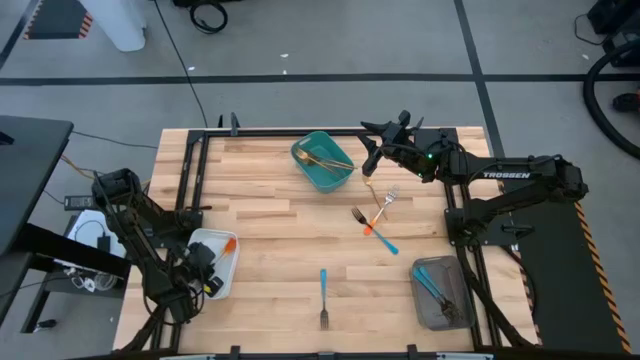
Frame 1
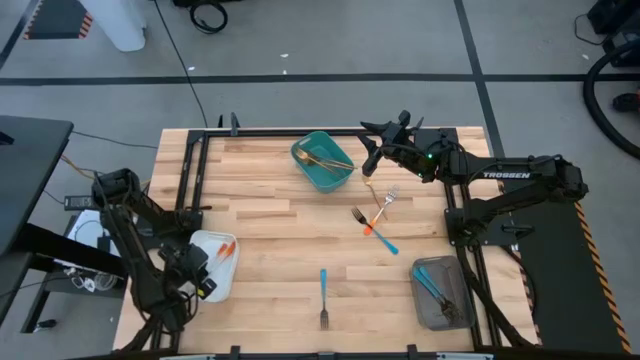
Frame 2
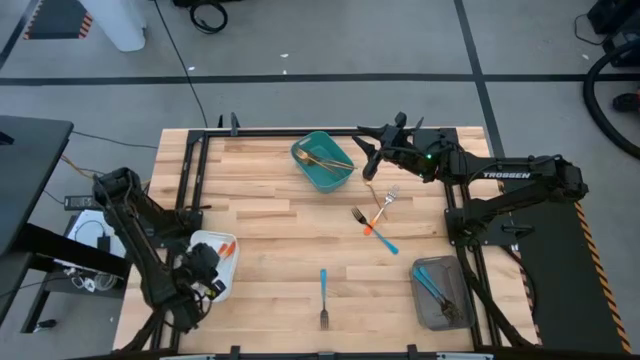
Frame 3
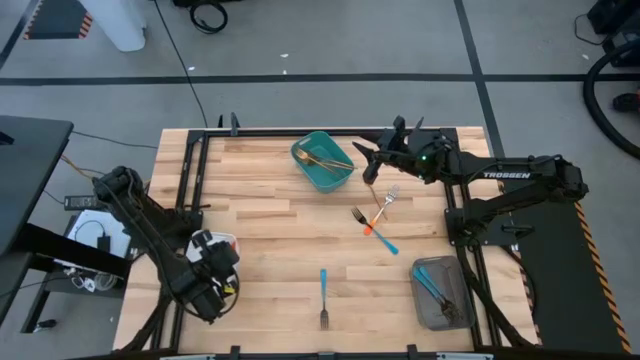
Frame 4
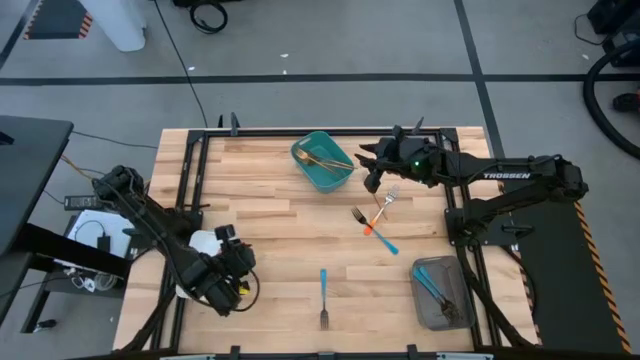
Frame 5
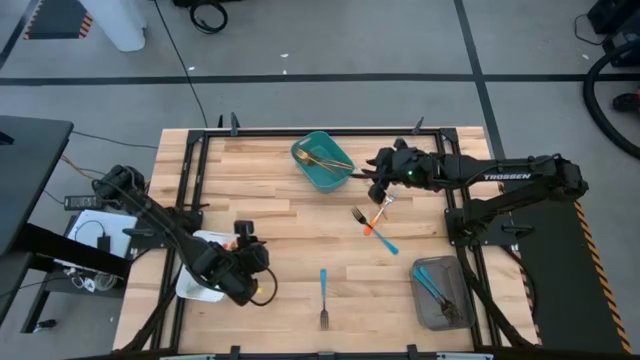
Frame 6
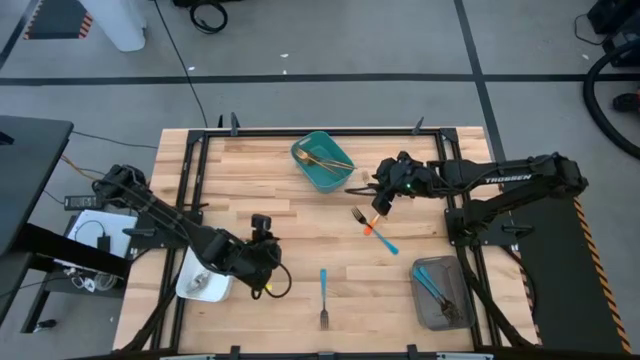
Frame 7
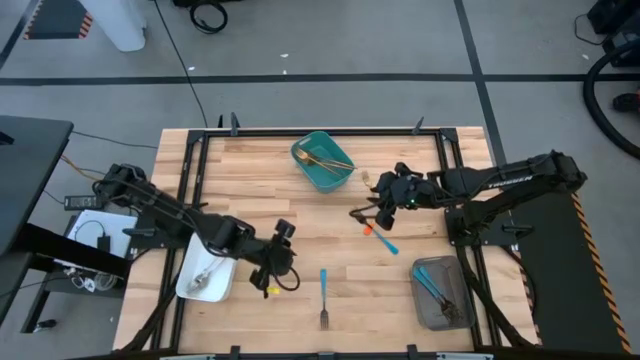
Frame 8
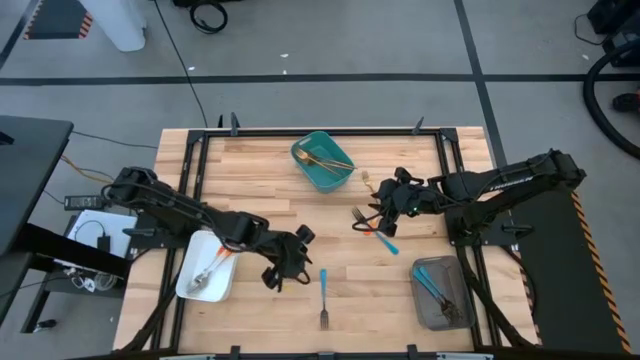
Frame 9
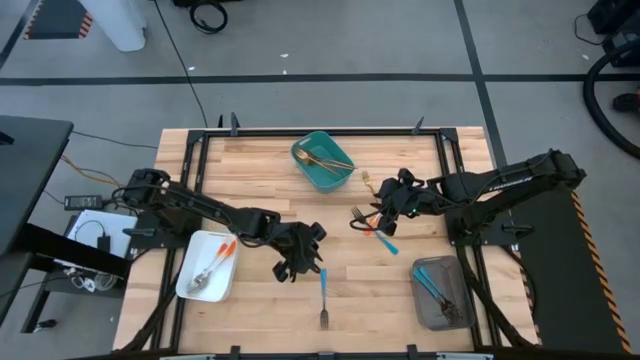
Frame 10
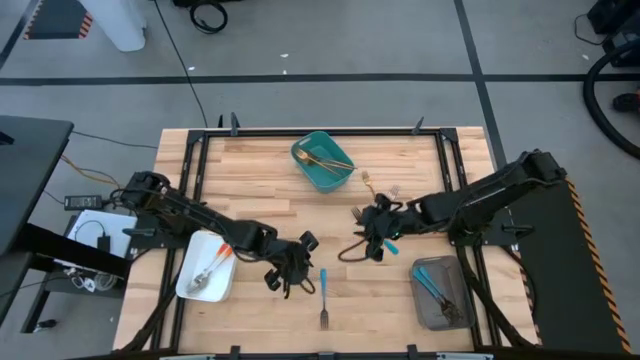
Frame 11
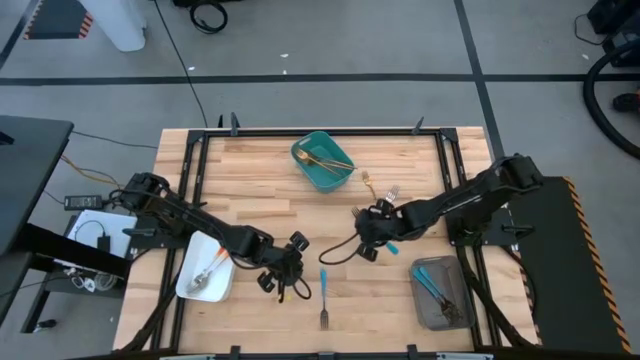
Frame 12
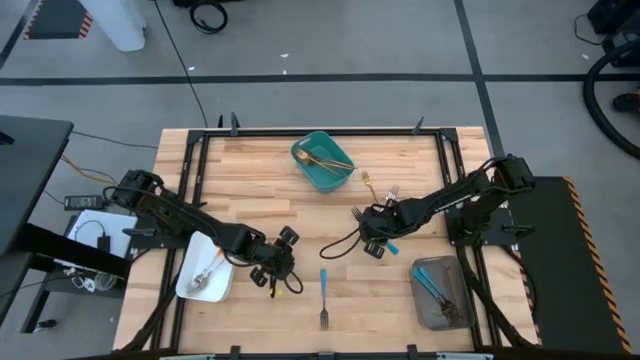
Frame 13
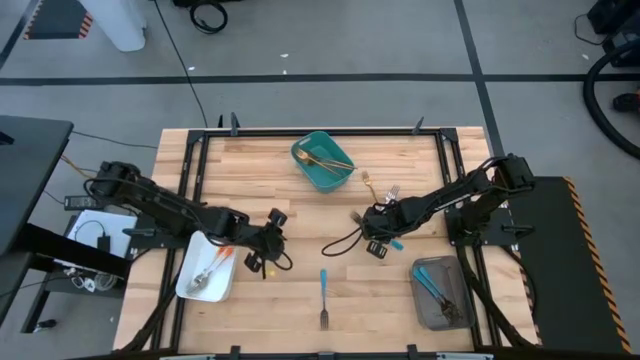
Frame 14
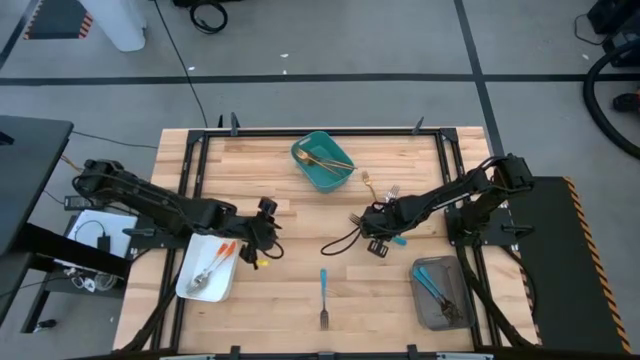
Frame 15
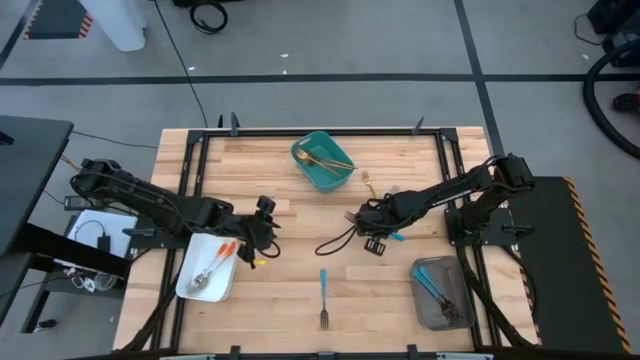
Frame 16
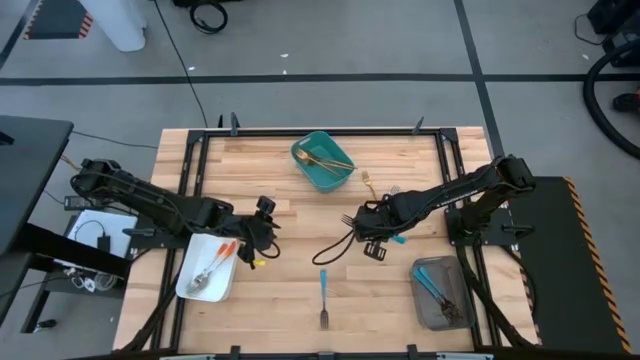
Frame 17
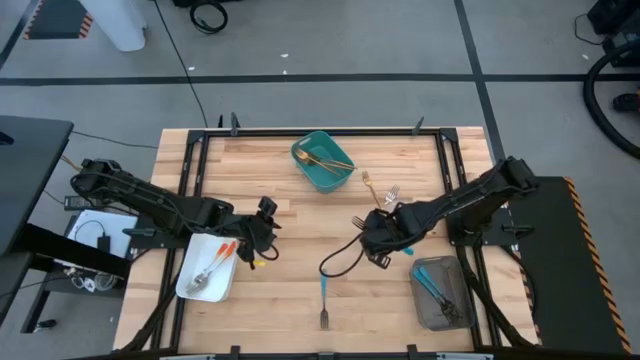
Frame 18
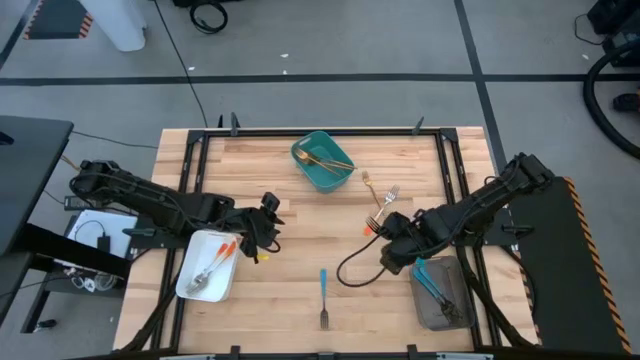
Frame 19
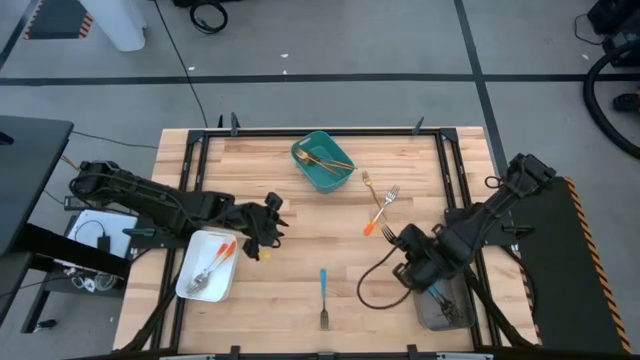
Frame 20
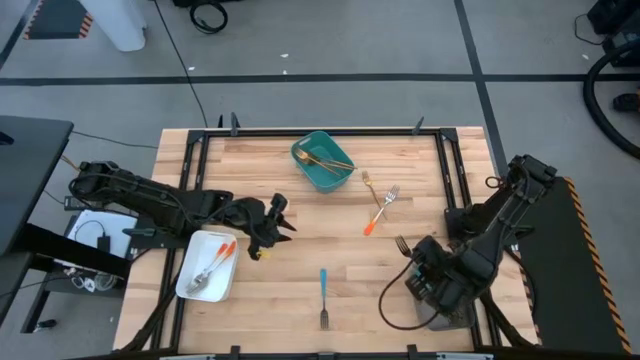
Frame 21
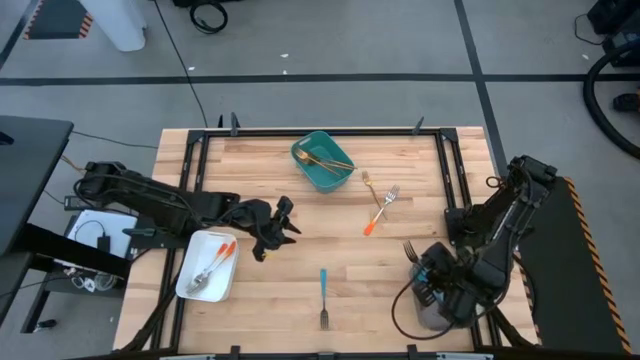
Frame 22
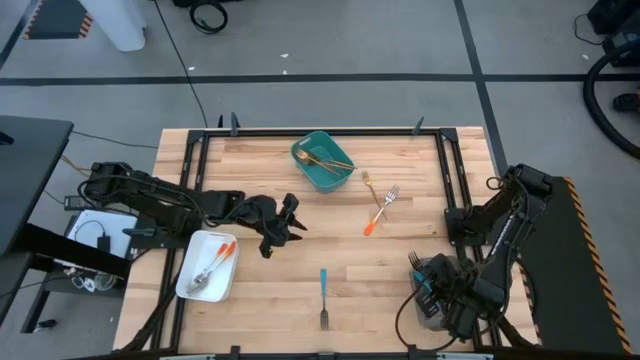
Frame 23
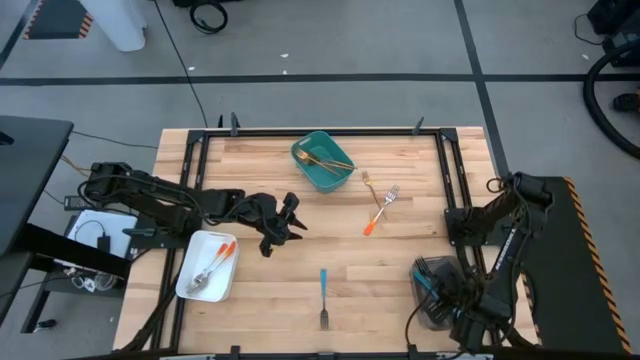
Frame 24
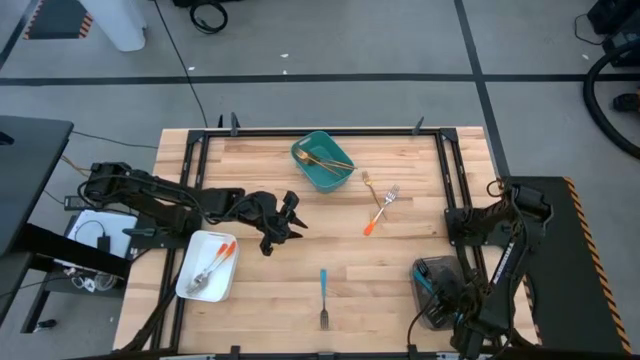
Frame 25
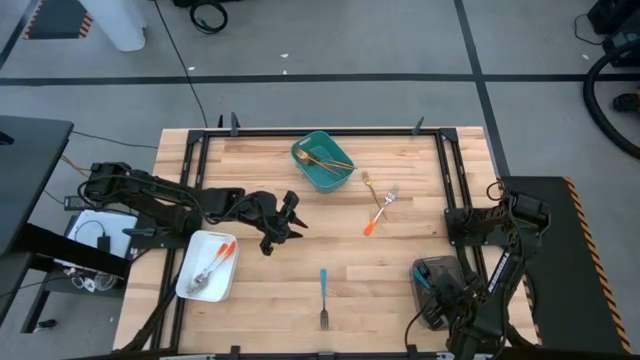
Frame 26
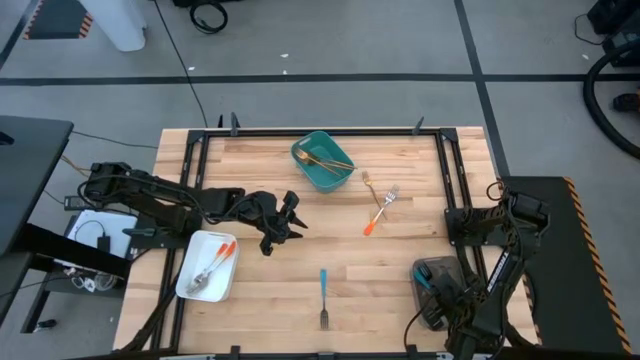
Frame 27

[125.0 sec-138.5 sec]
Task: Sort silverware by color (type)
Put the blue fork into the black bin

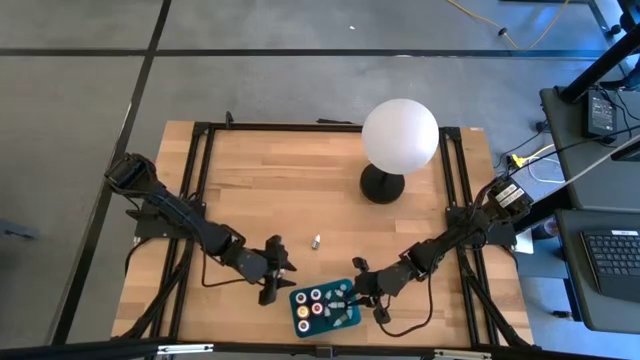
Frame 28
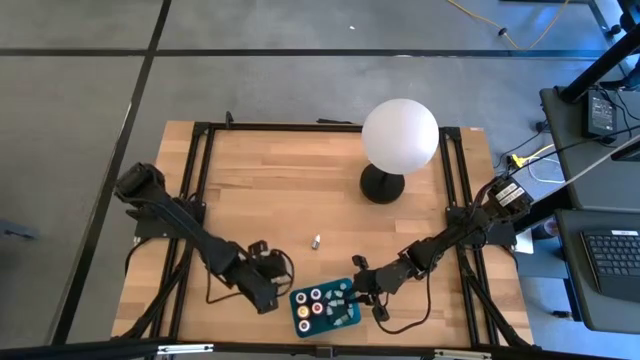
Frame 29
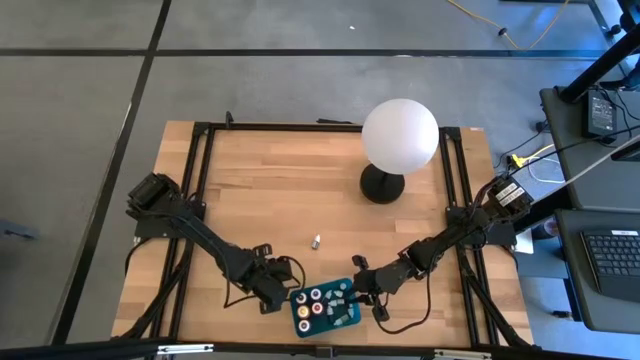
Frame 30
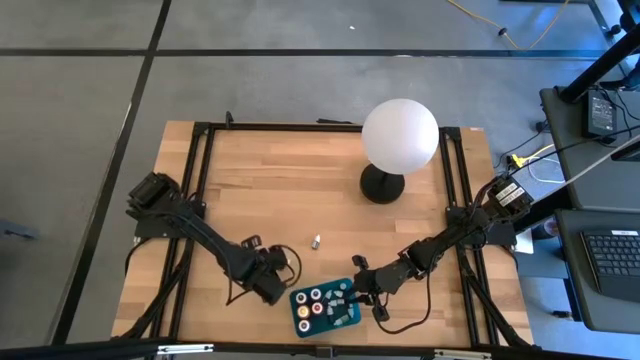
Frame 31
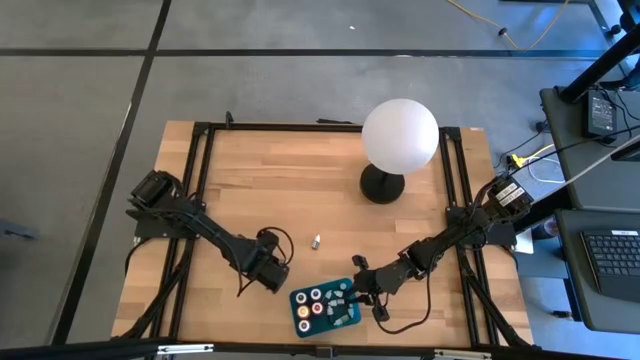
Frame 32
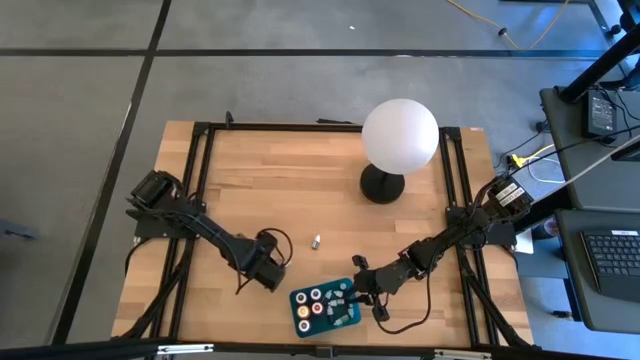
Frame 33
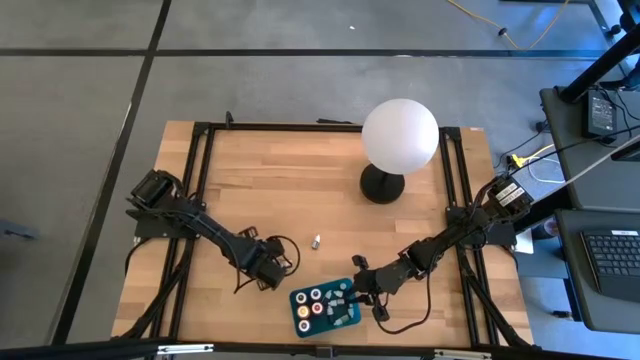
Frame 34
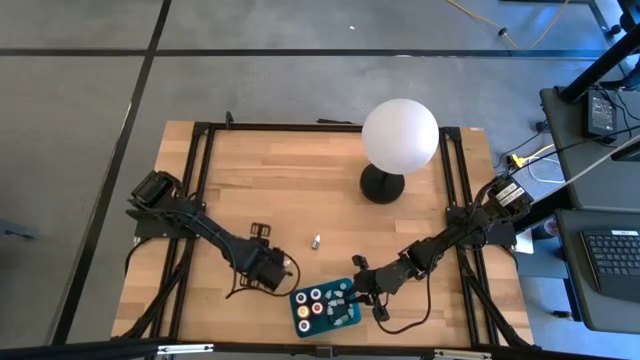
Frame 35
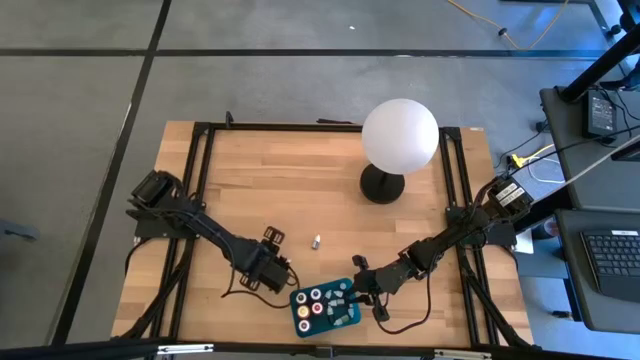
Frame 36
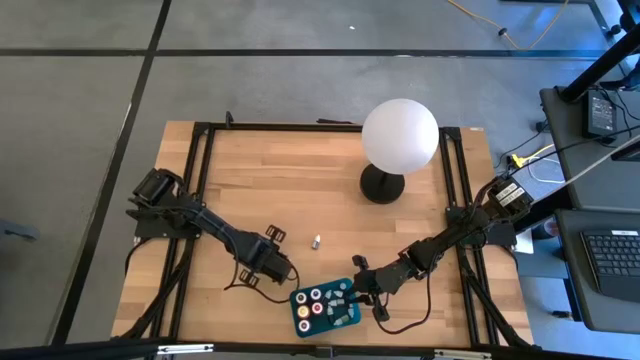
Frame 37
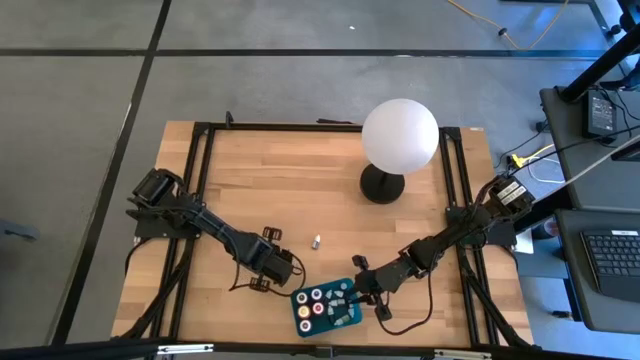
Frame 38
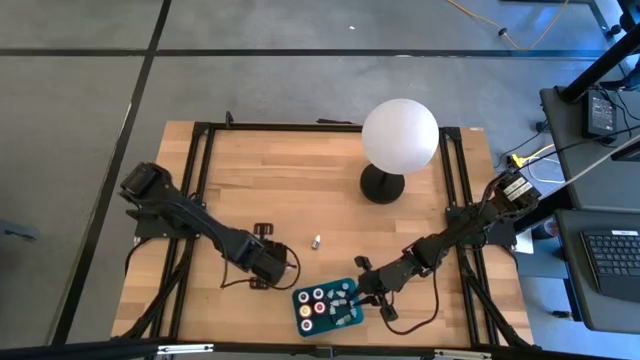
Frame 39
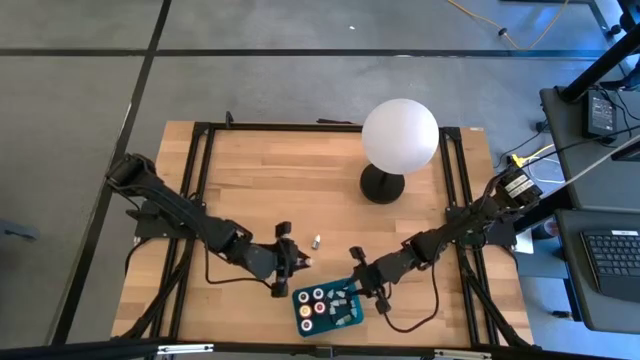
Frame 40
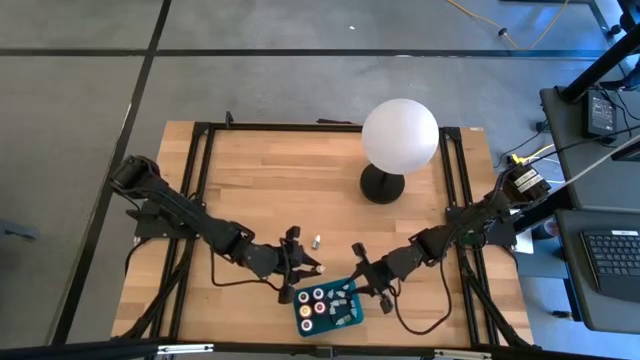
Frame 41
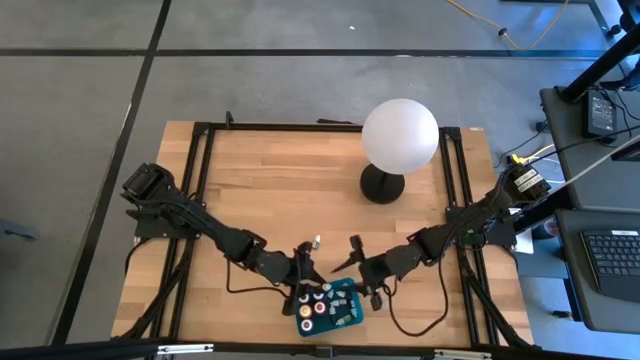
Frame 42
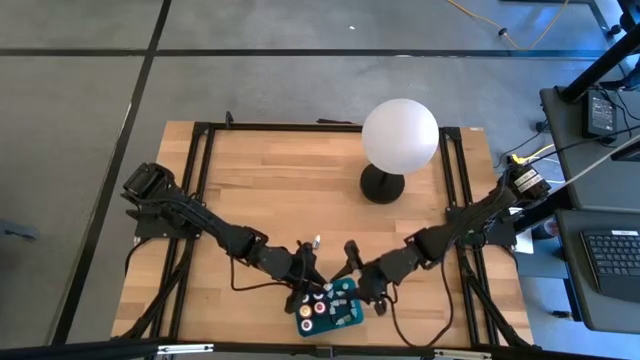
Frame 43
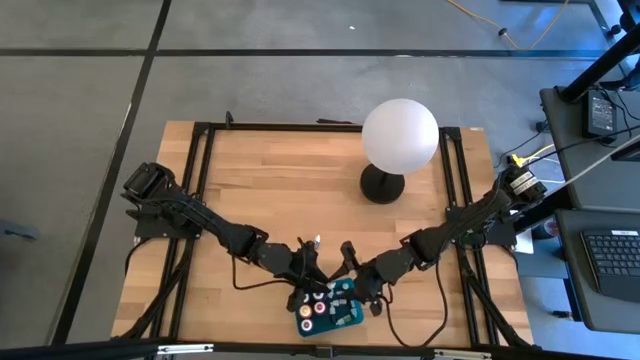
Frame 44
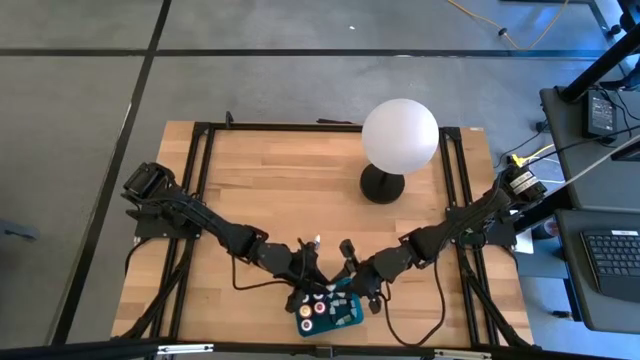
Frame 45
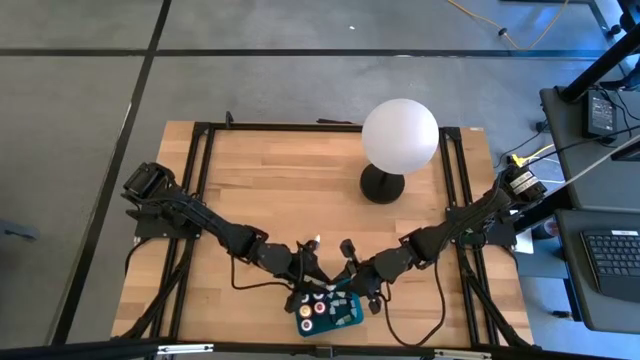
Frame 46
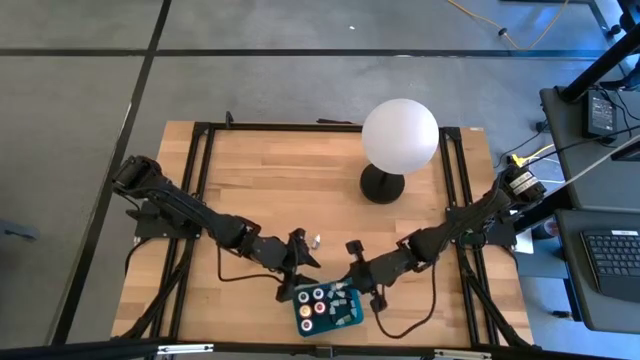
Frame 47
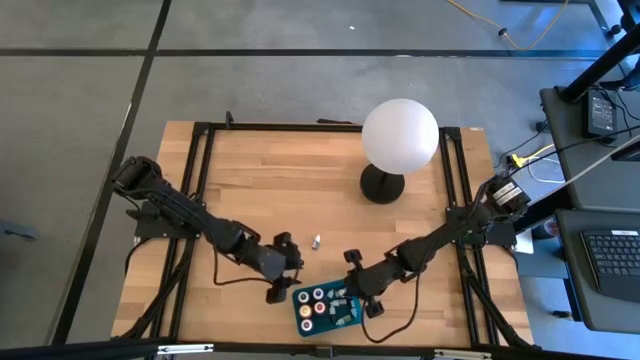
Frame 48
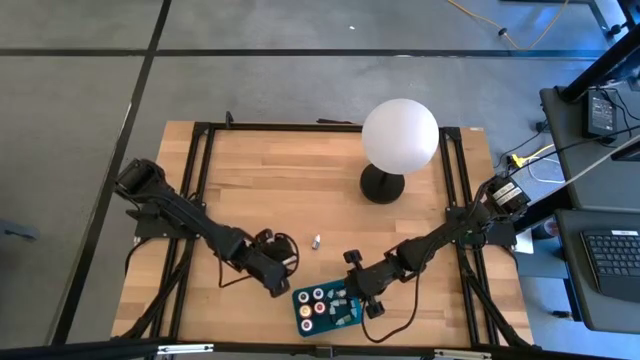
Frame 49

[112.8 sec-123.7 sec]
Task: Pick & Place food coloring
Put the small red food coloring bottle into the blue bin
